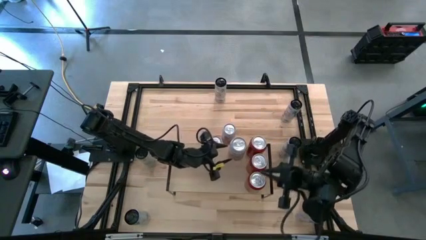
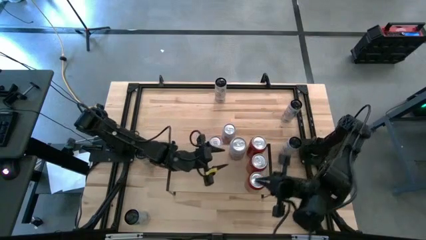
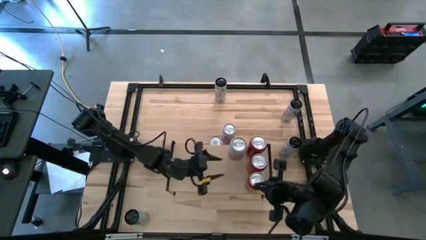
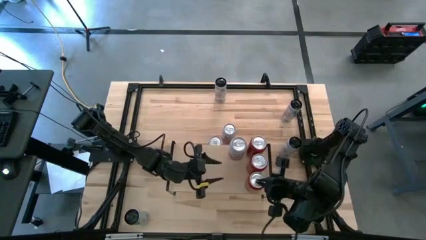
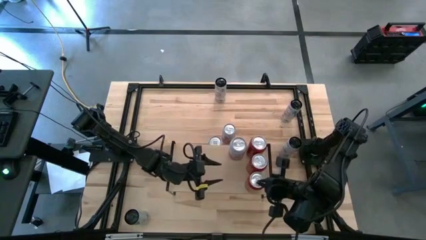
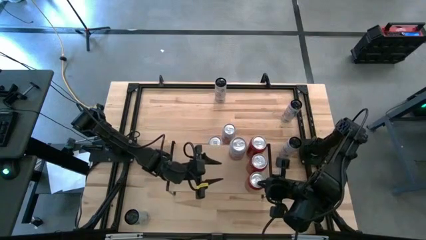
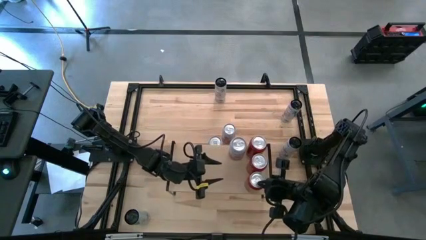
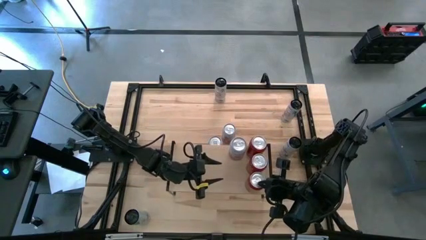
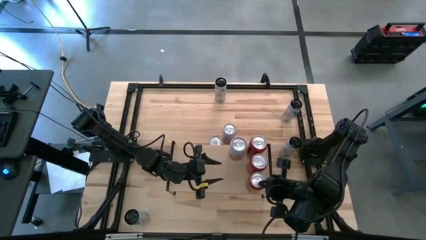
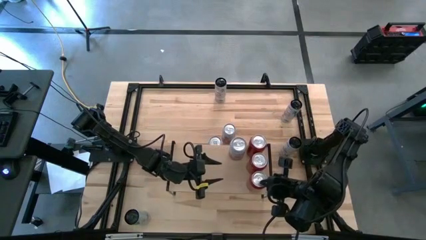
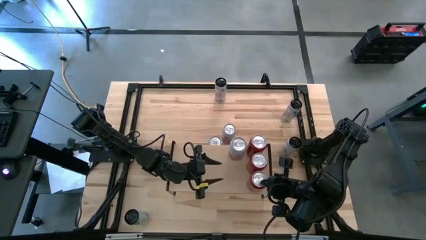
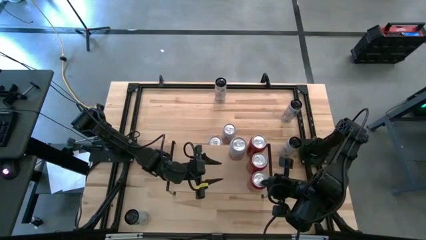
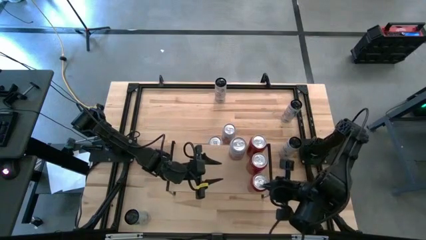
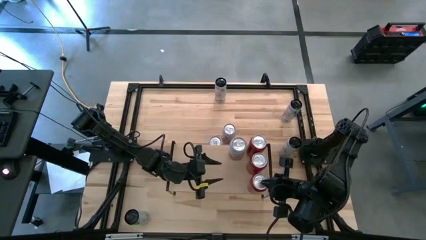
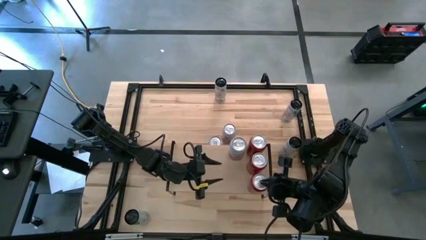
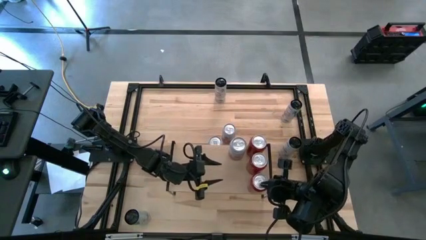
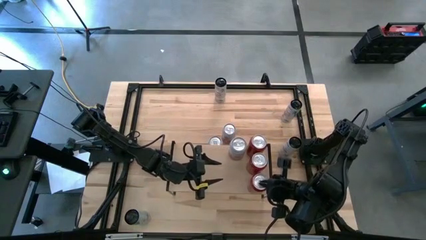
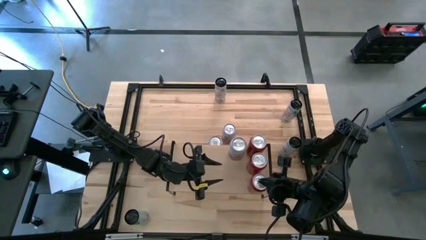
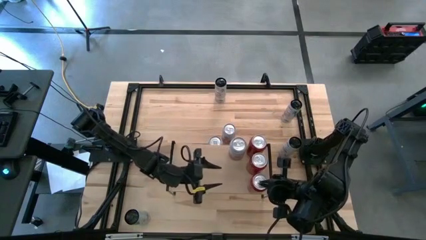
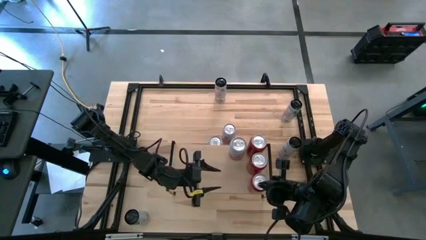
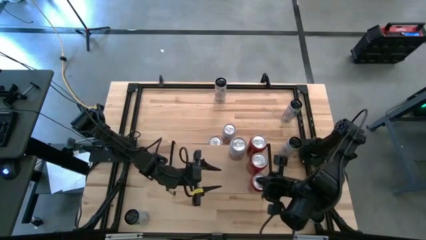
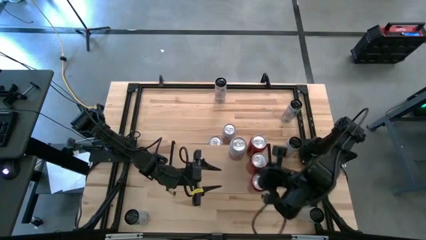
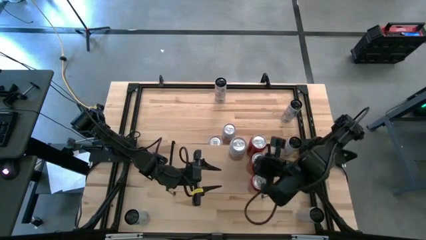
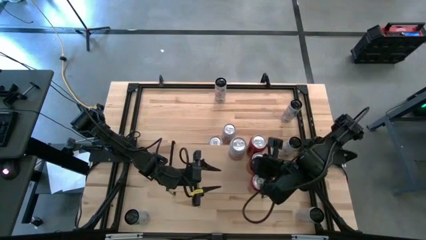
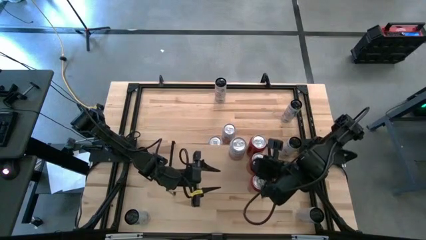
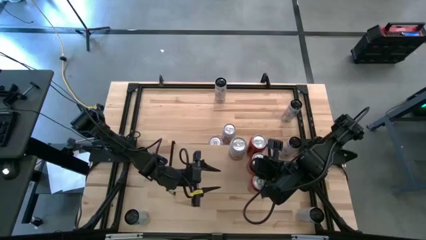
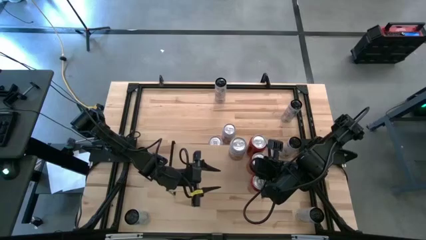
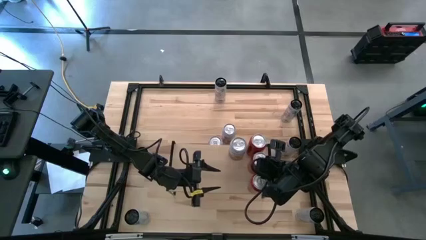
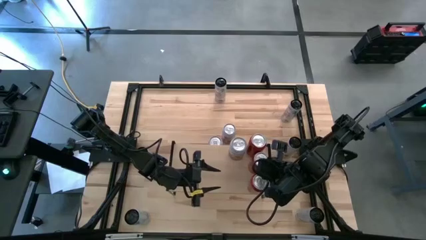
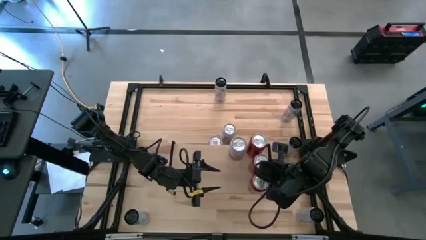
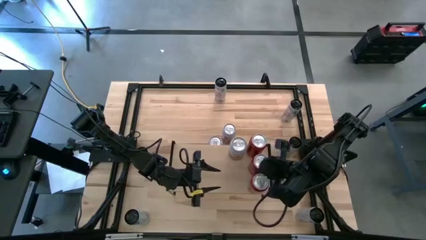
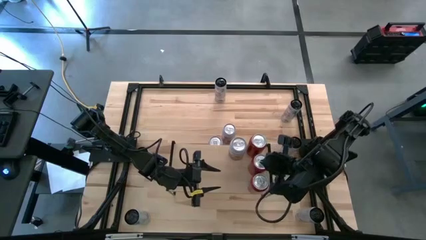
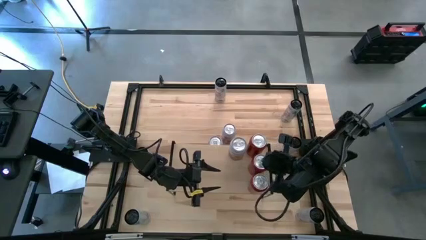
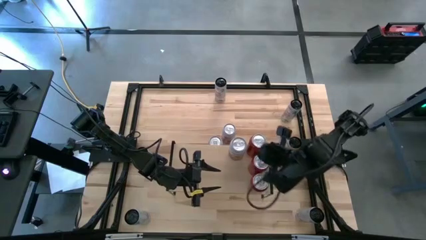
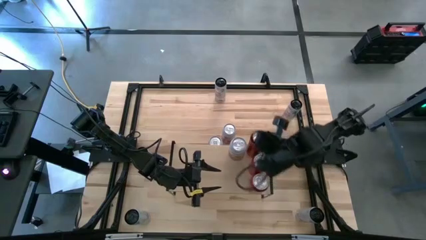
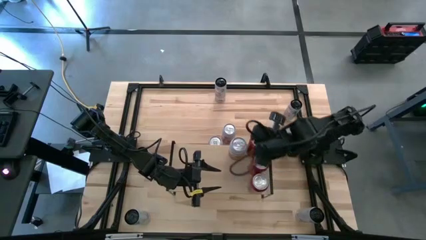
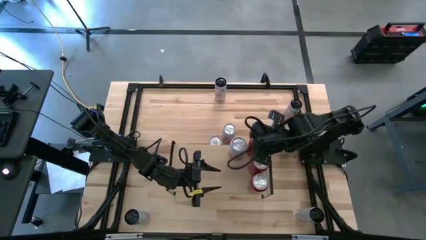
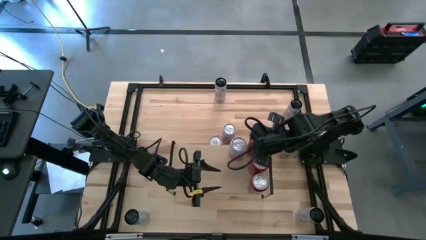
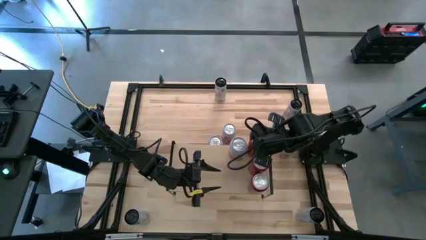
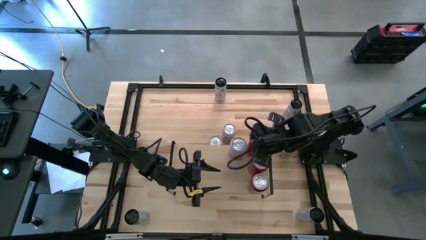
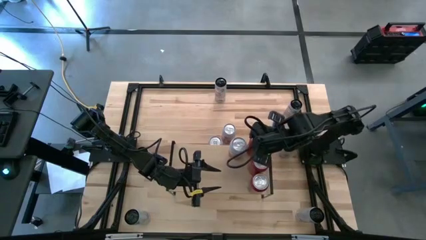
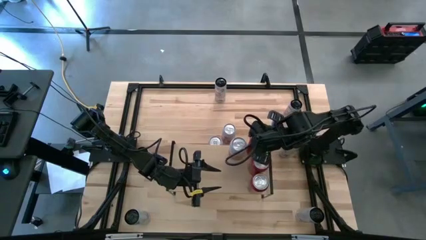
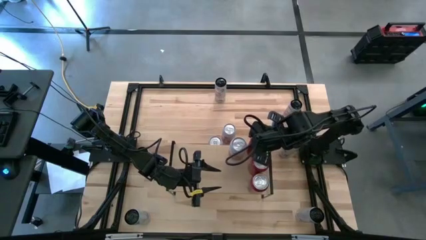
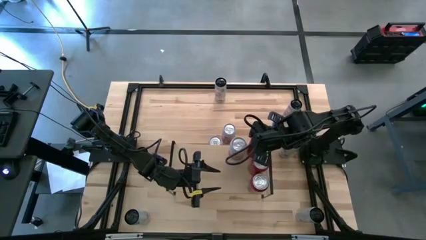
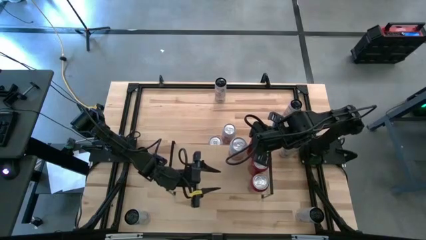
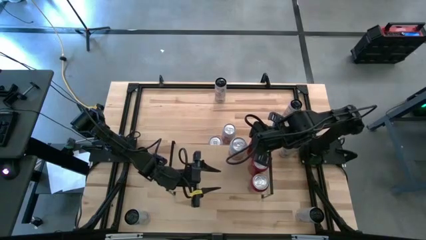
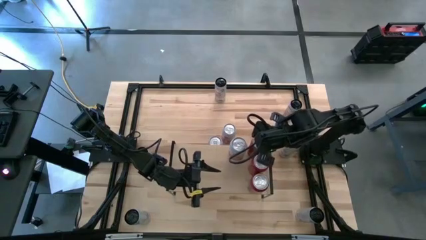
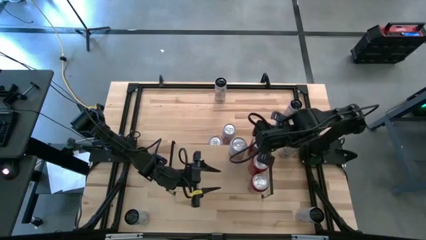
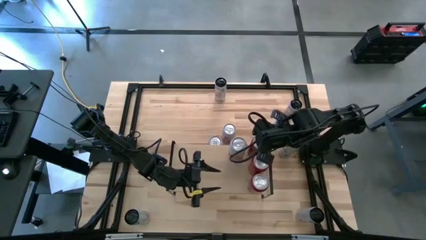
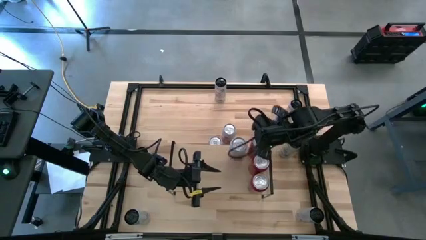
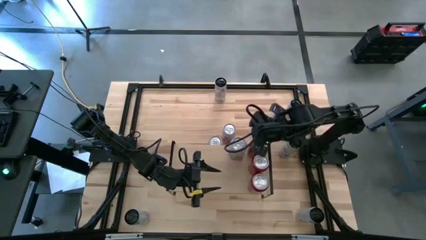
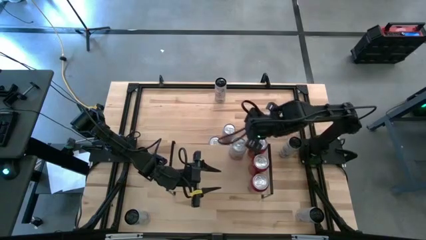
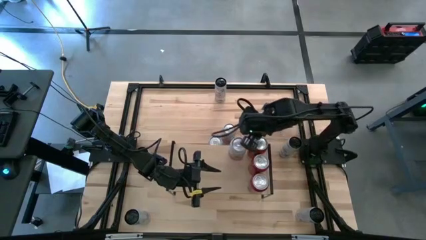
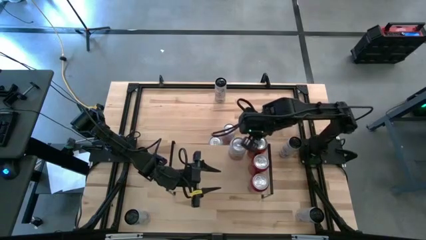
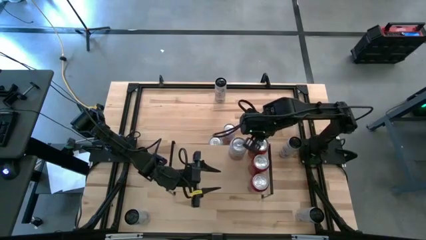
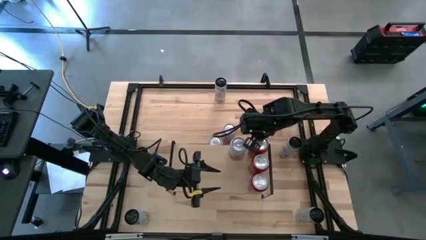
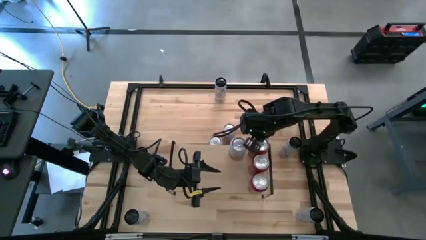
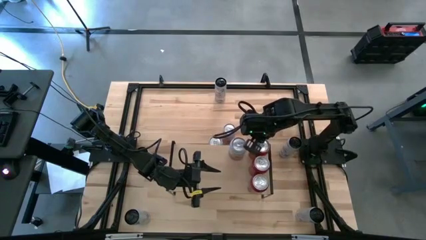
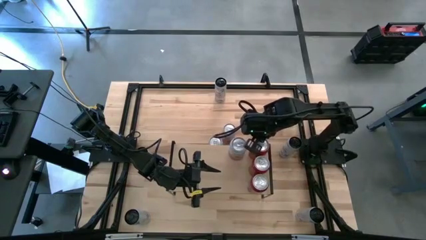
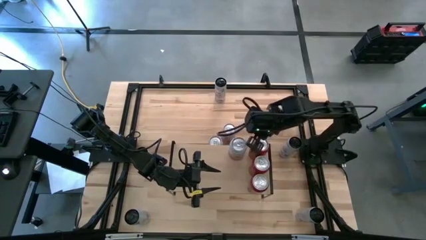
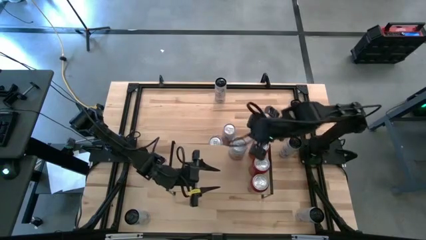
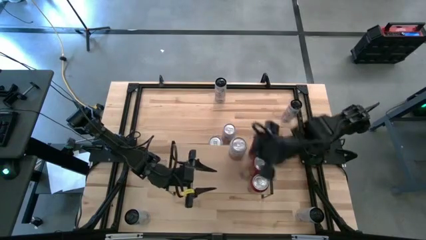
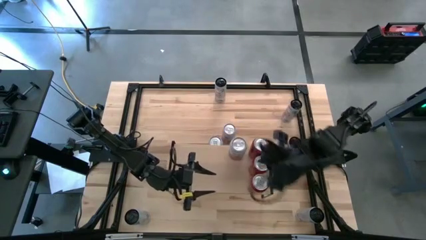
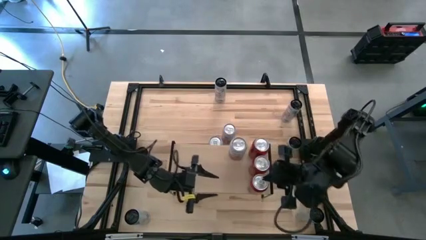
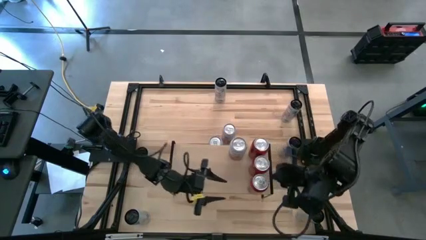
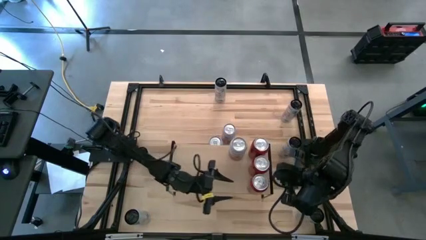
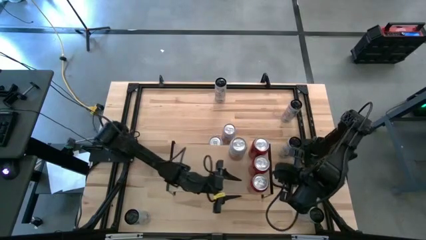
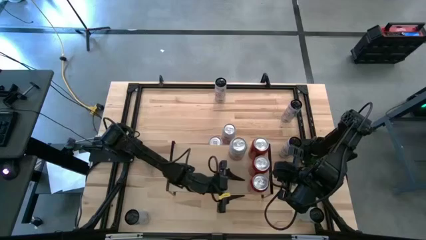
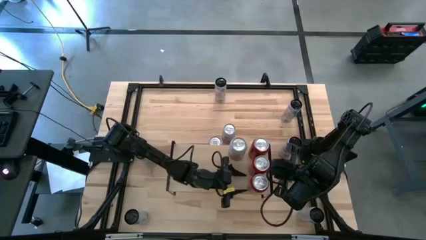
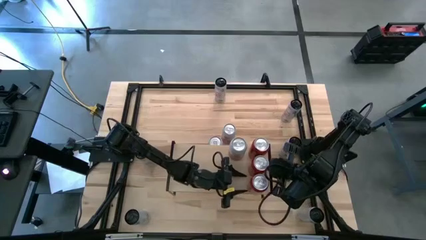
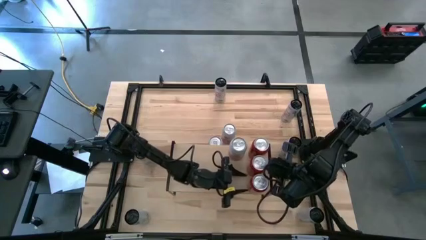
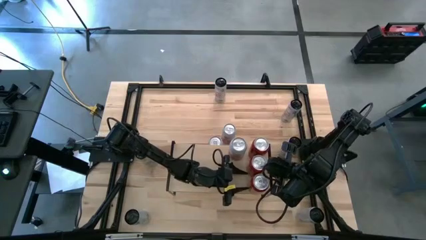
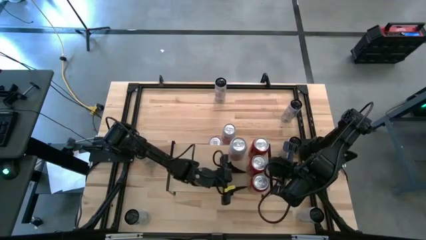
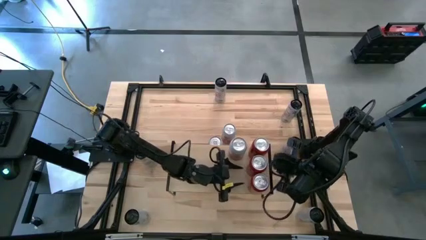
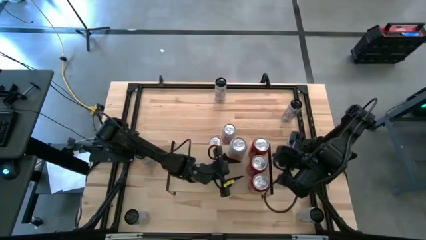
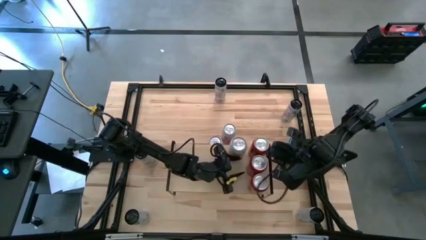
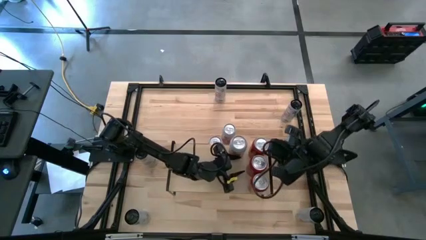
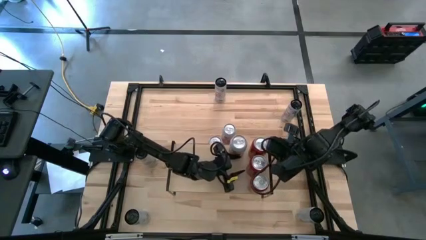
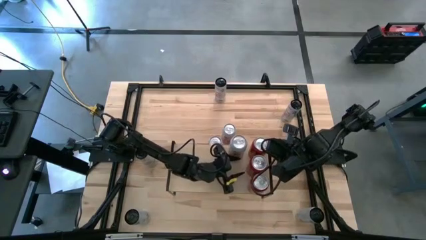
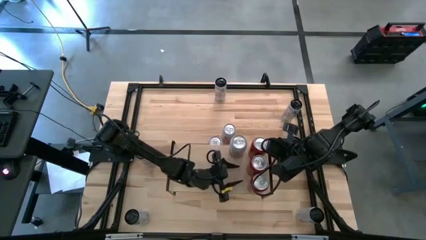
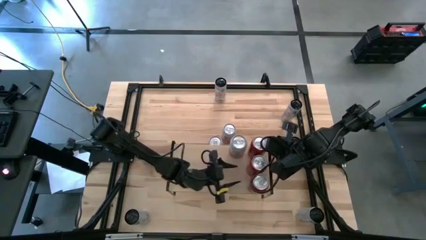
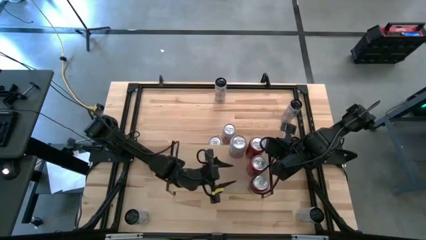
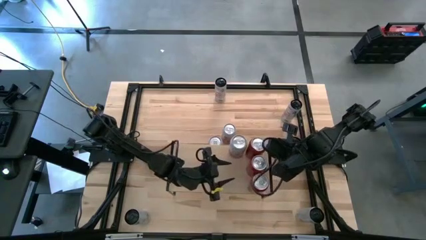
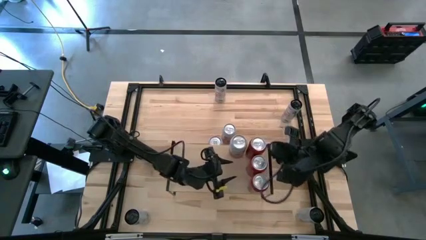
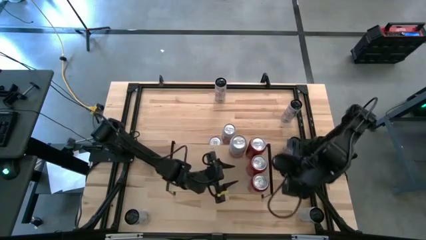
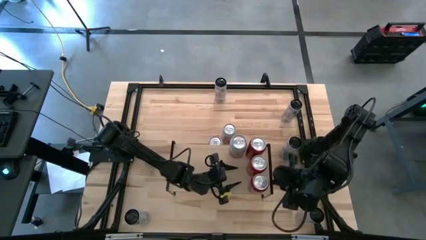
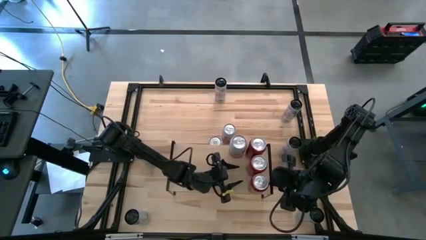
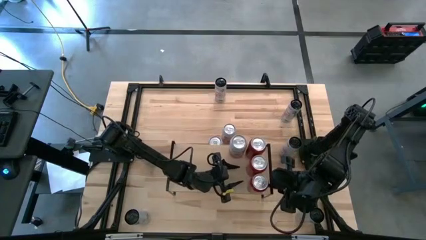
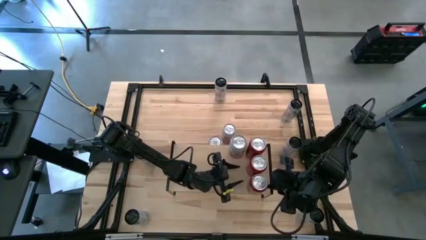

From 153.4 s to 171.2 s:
Task: Place canned beverage on shelf
Adjust the red-black soda cans on the shelf
